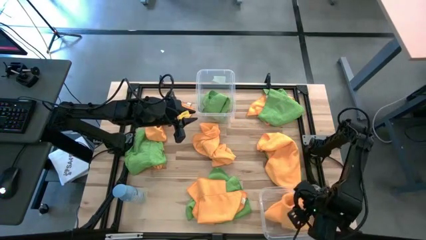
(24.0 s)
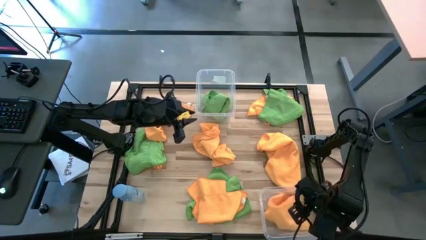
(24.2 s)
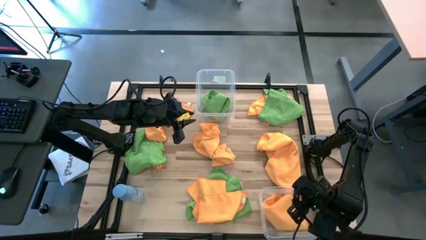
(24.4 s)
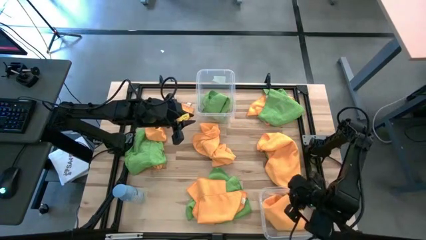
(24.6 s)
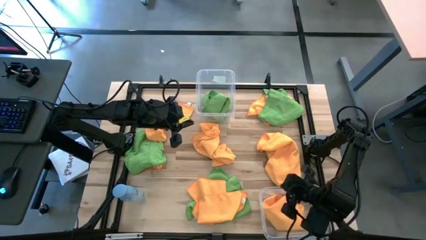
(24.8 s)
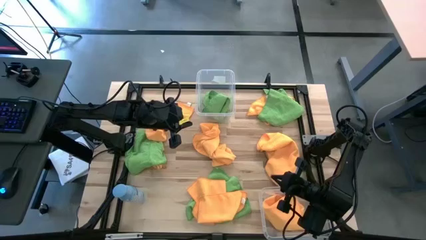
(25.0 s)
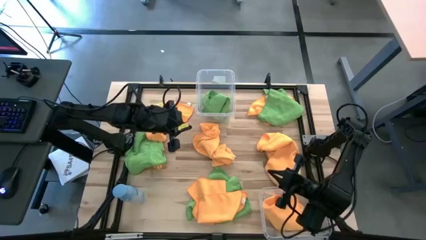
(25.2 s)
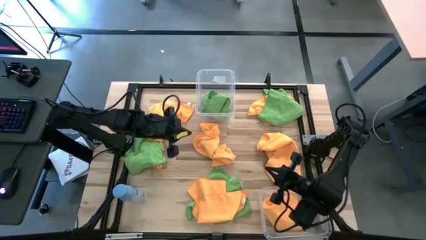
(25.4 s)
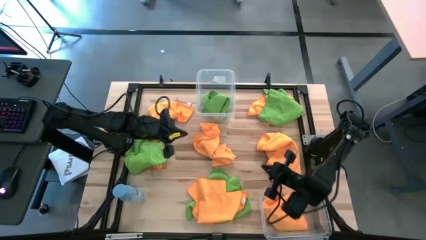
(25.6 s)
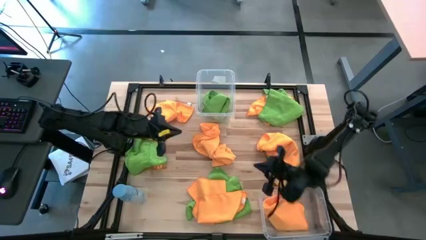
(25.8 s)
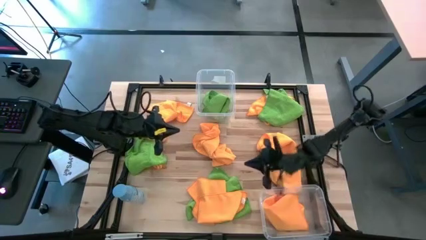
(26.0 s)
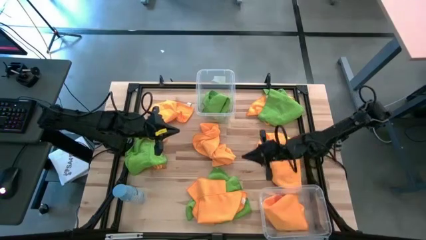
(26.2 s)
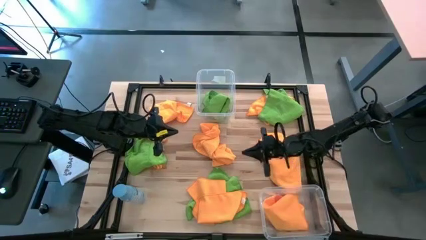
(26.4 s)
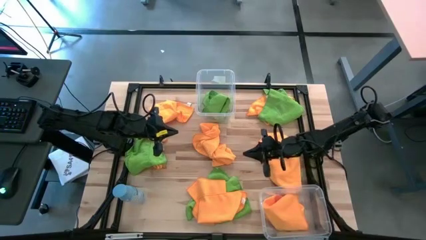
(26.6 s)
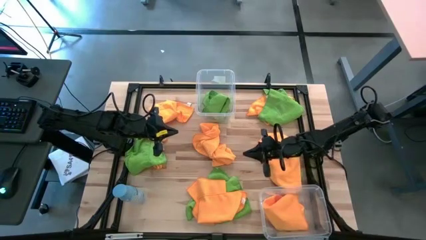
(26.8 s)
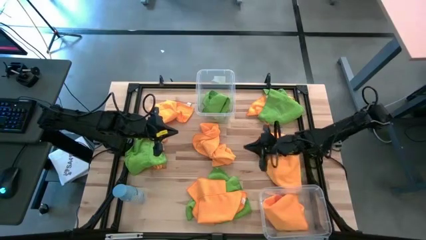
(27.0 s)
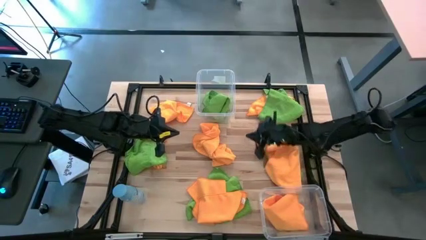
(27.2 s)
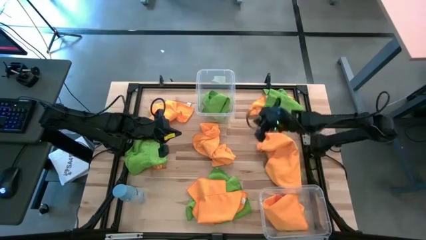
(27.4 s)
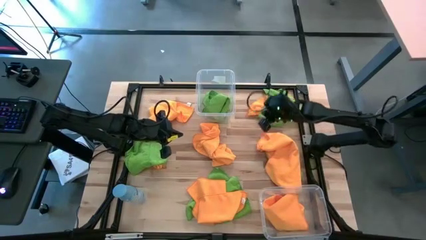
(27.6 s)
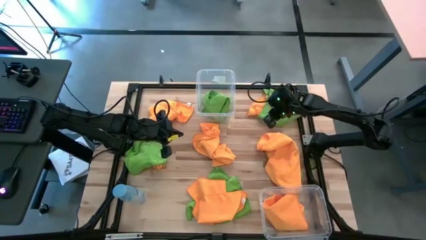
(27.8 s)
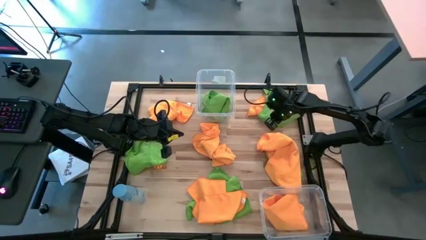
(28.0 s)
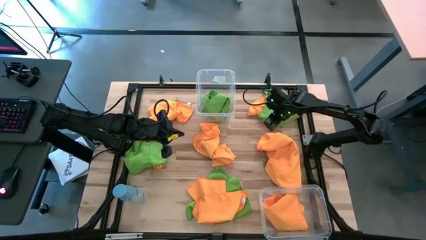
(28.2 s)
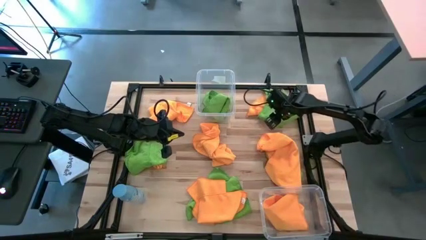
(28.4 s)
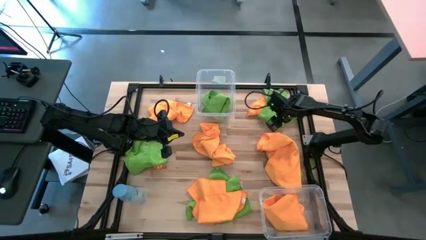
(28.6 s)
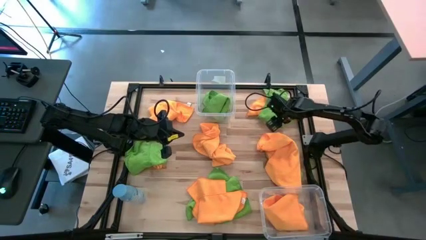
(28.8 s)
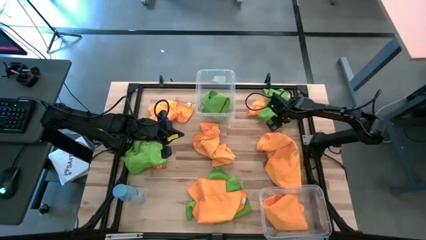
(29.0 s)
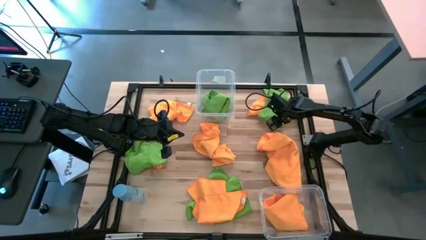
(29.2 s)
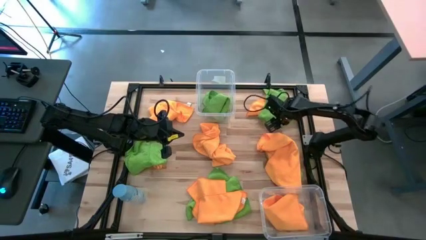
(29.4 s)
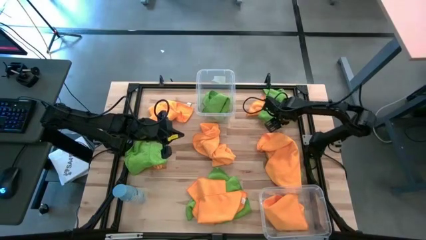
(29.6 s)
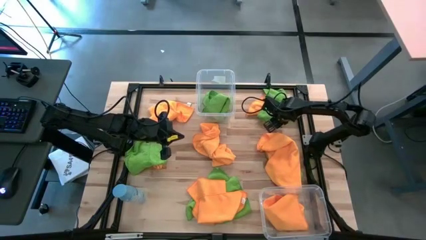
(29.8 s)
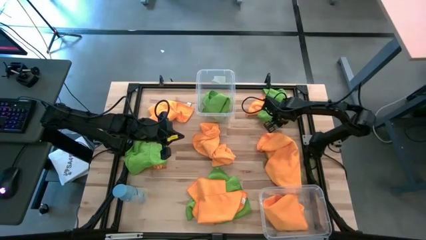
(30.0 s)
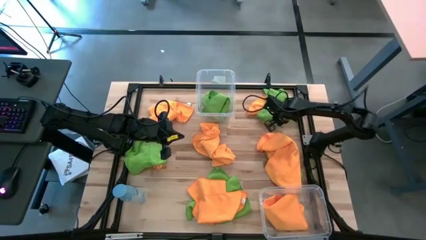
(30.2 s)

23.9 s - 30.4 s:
Task: Sort microfiber towel by color & place in baskets
Put the green microfiber towel into the top transparent bin

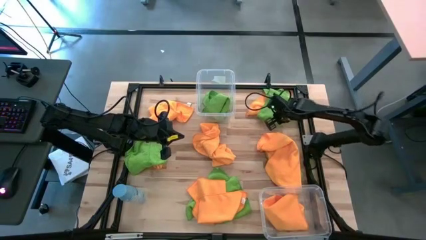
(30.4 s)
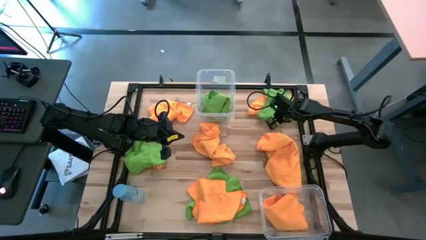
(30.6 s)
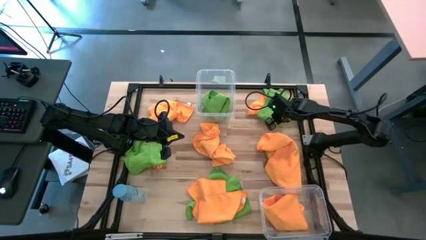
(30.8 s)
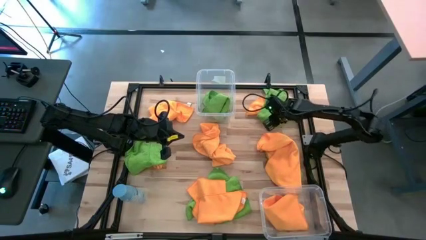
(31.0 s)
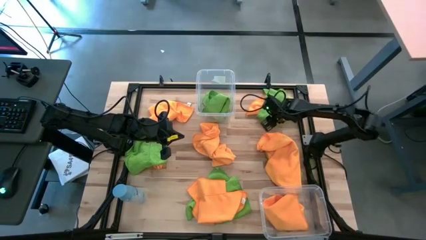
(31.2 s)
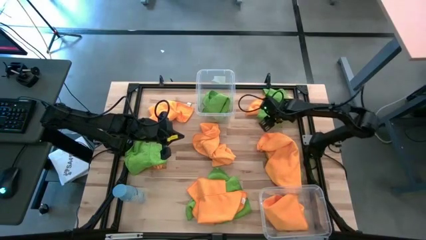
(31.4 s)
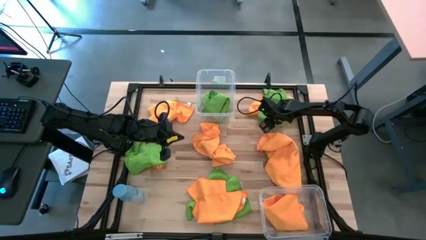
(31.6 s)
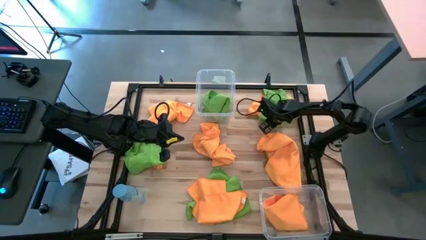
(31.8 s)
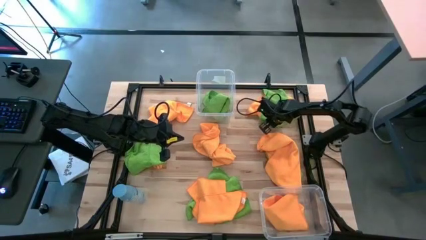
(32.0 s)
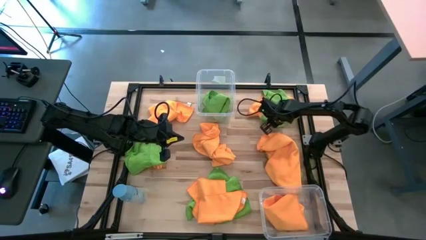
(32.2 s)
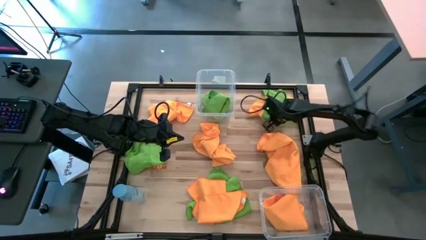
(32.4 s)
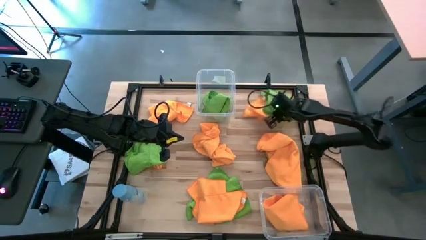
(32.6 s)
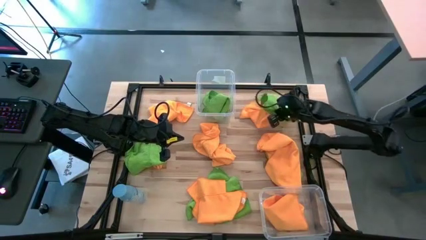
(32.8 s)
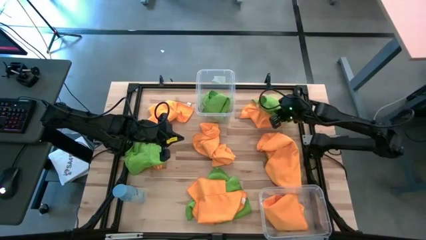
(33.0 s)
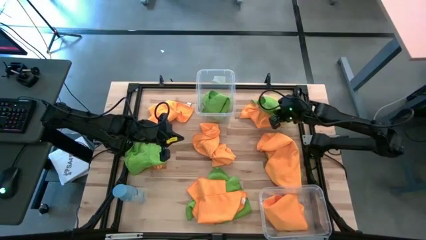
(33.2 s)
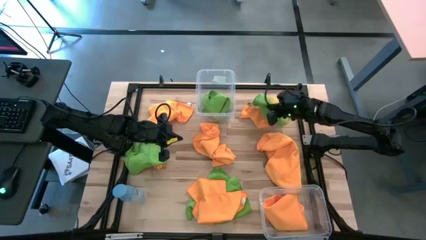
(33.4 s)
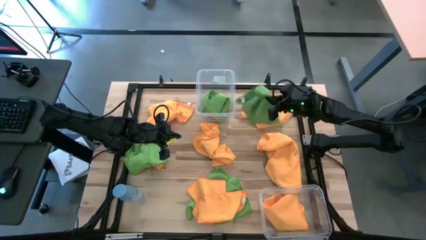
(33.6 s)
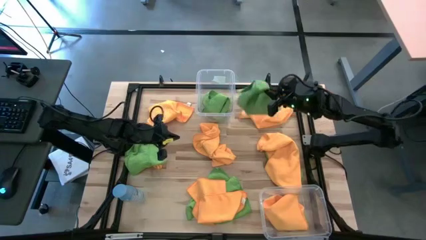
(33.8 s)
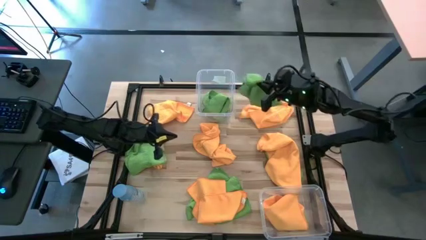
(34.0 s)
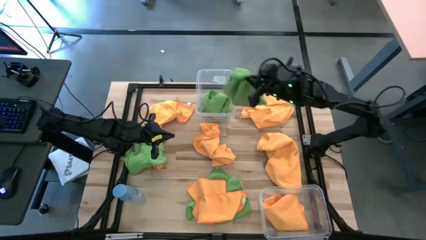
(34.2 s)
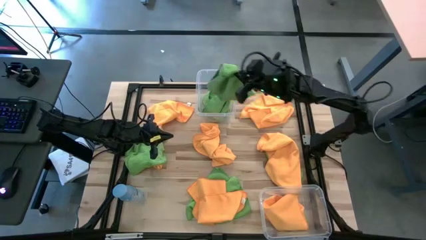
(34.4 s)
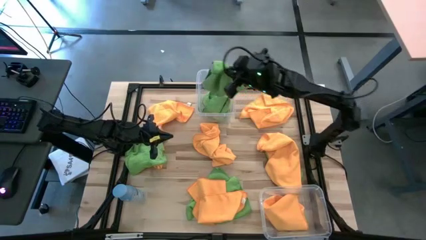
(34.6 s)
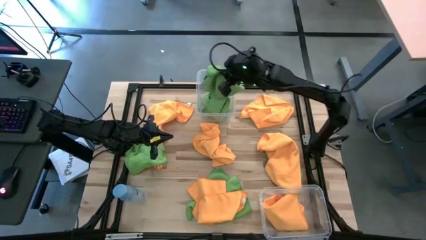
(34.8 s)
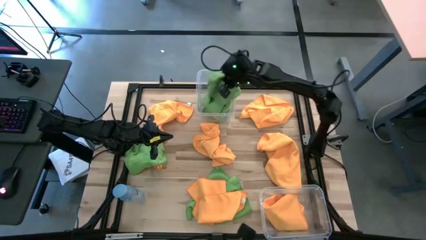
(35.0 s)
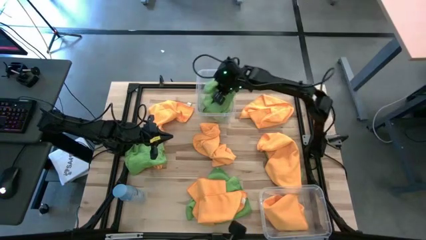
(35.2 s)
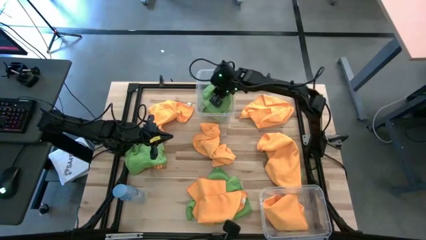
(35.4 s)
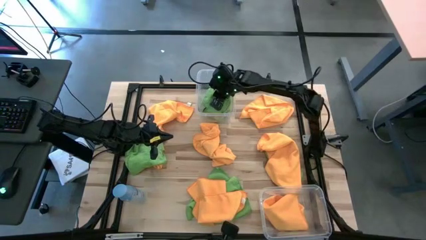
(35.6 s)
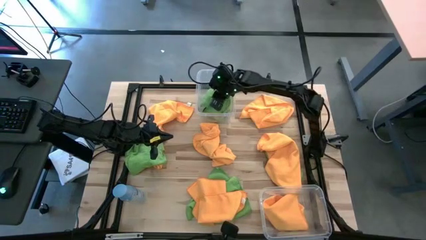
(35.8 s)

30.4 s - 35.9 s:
Put the green microfiber towel into the top transparent bin
